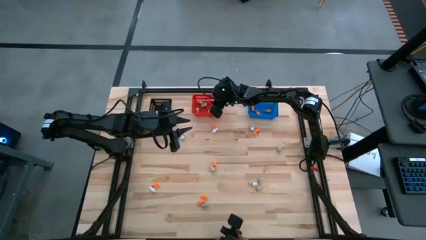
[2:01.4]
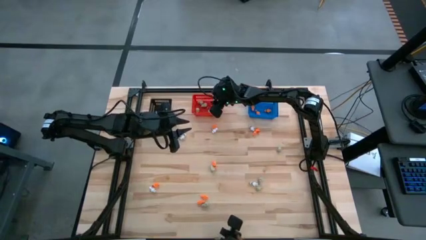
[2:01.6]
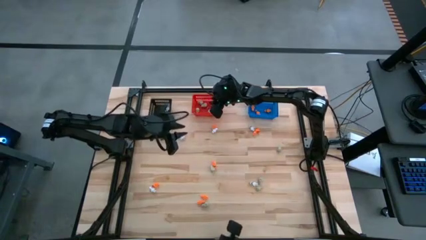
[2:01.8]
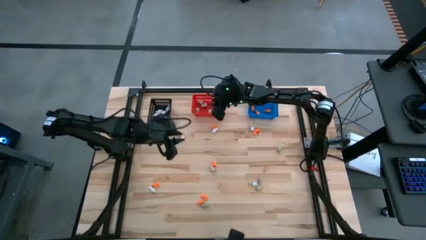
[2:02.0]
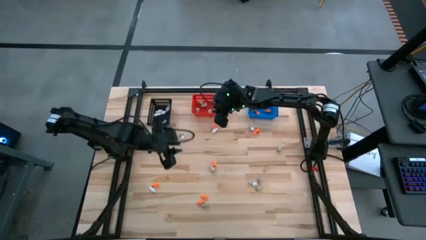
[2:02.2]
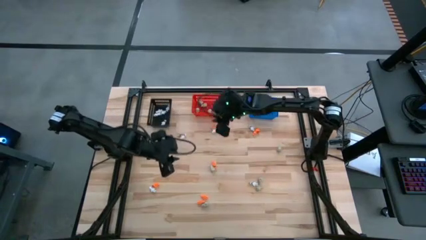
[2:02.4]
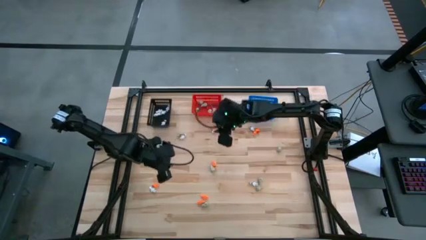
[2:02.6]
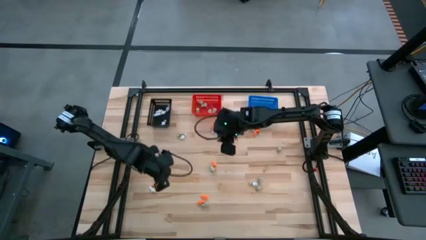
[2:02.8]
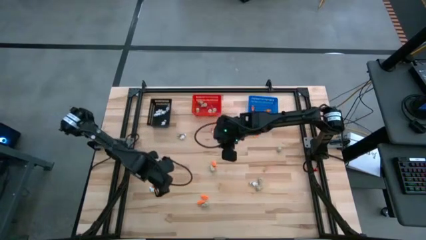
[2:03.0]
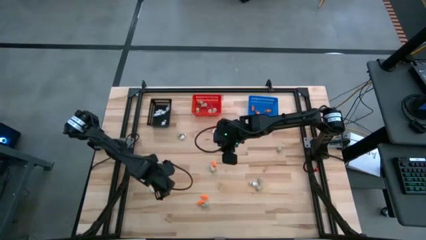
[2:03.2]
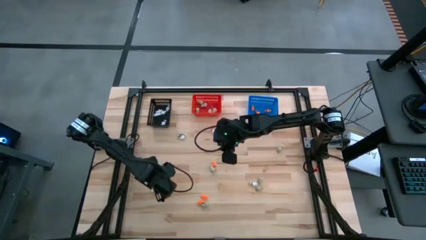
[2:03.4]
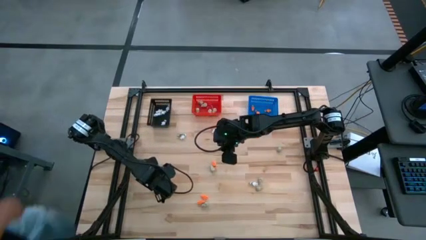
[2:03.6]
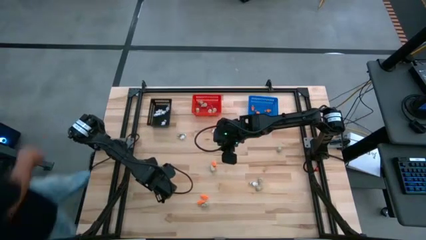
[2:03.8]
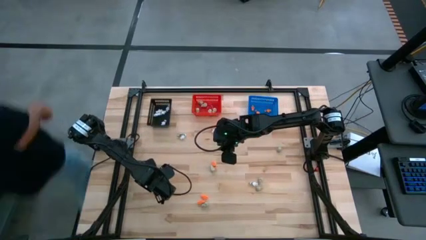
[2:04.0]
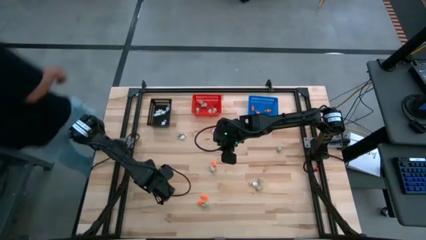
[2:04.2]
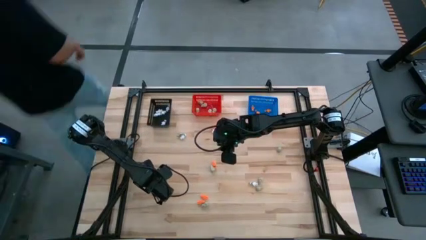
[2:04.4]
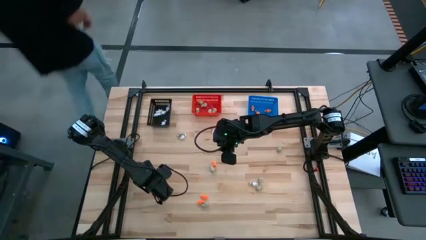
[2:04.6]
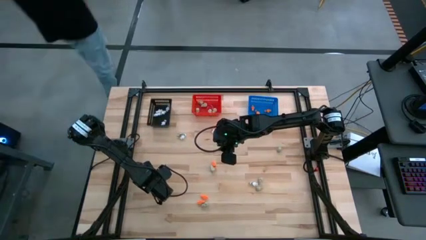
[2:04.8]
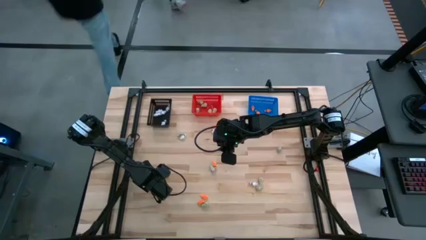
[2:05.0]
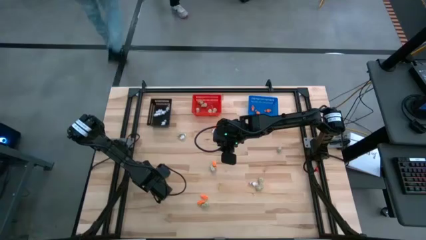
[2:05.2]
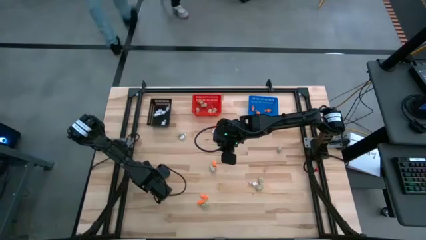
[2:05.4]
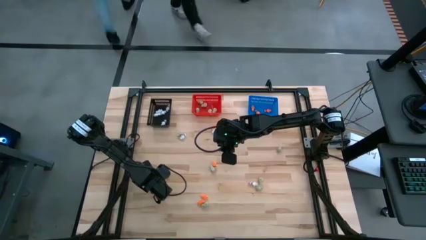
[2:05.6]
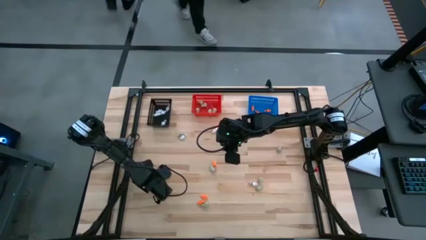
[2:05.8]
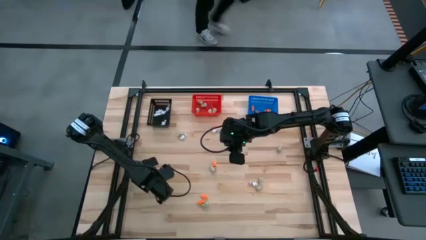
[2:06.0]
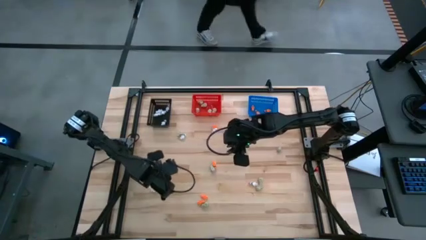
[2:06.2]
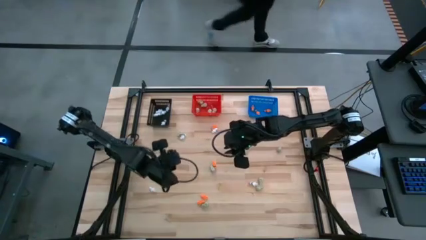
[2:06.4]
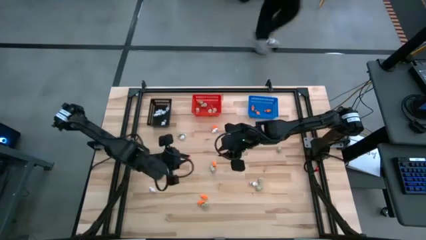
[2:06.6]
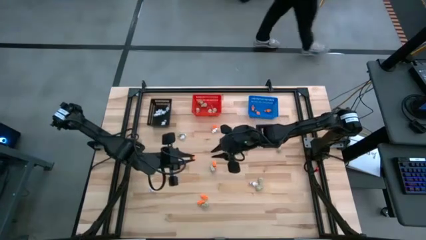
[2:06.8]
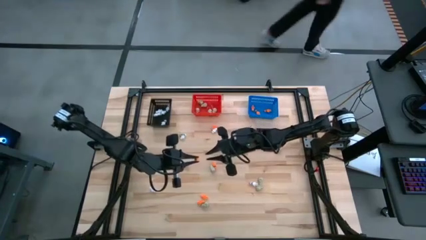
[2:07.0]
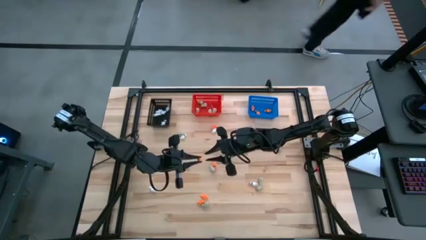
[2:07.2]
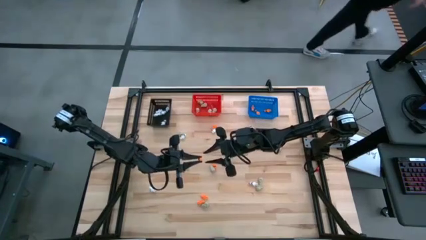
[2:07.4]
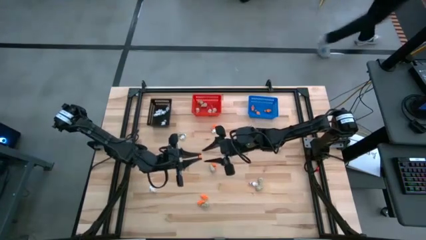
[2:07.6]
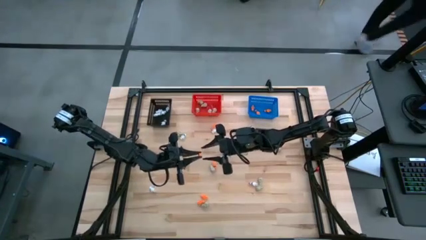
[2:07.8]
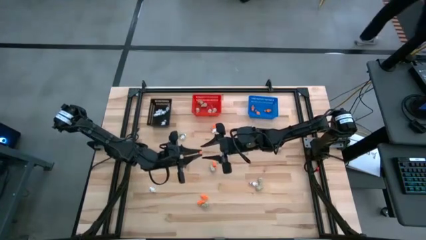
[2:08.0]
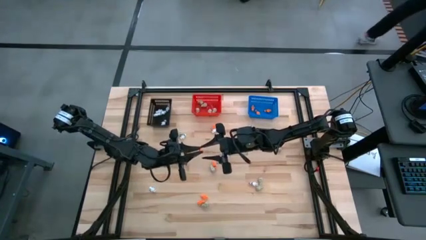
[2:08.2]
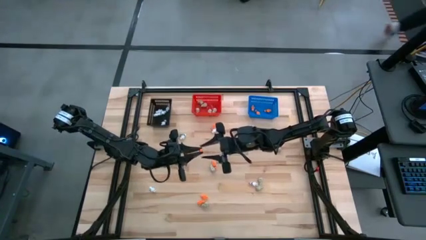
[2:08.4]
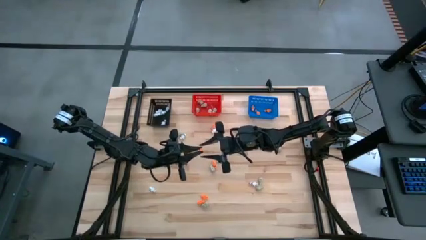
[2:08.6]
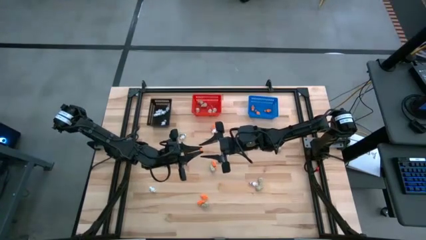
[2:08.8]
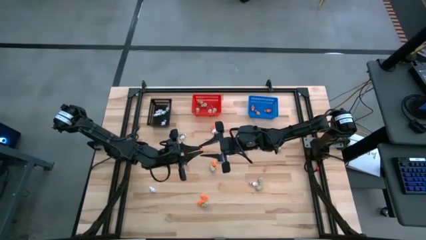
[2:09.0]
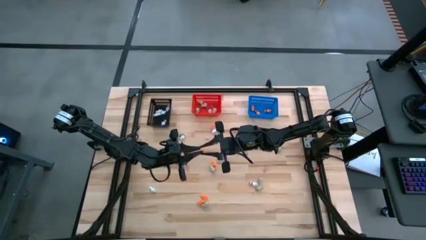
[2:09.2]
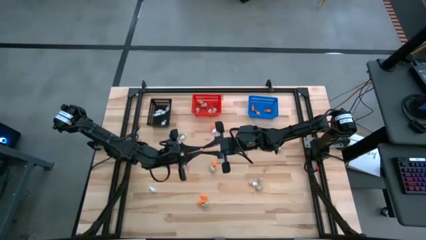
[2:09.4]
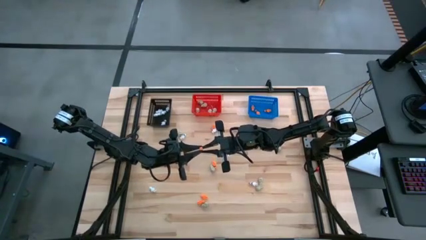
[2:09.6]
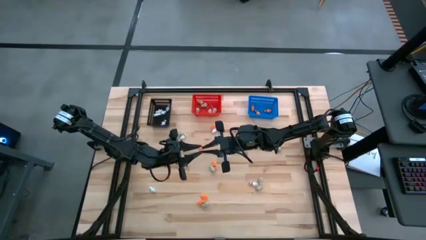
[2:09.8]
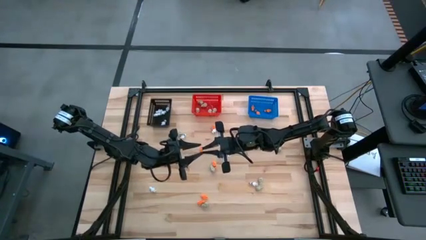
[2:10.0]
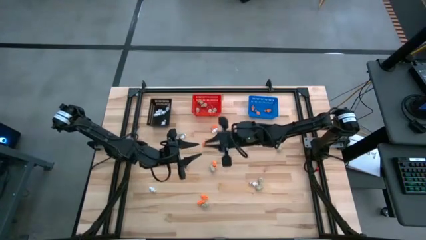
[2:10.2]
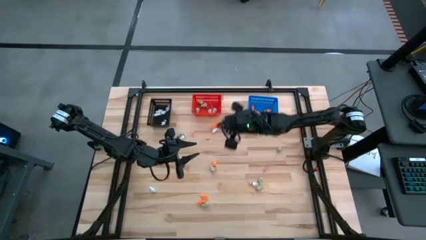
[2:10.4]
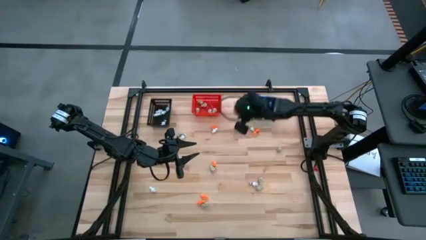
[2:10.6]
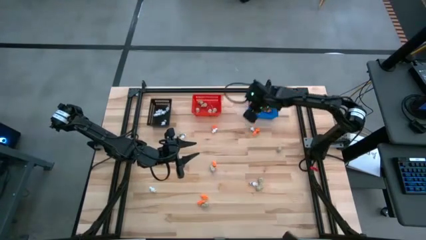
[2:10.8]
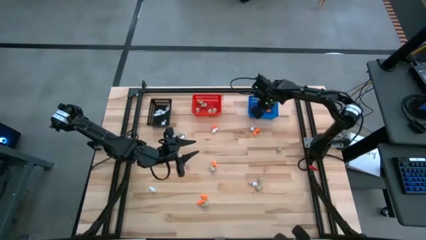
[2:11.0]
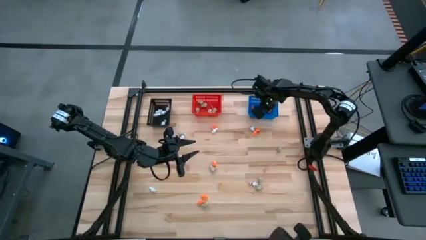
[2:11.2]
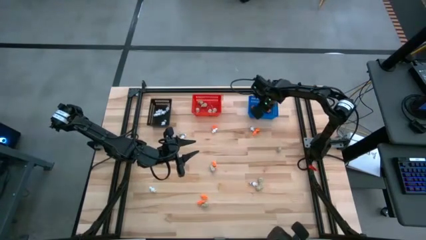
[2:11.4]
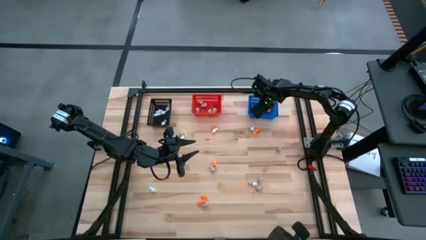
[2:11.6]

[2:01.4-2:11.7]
Task: Sort Halloween decoration
Put the orange skeleton toy into the blue bin

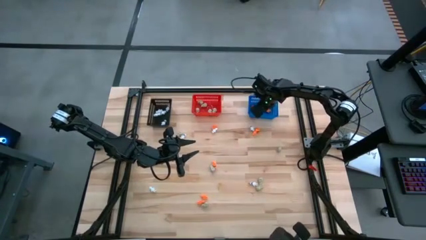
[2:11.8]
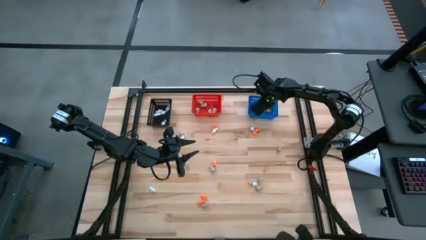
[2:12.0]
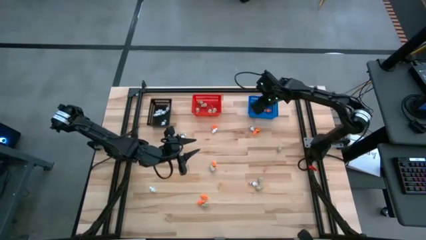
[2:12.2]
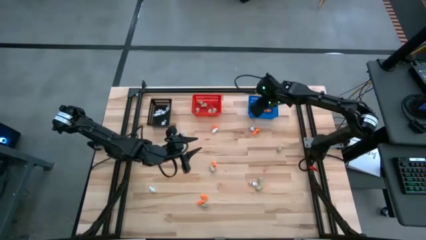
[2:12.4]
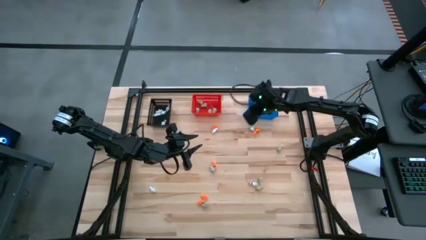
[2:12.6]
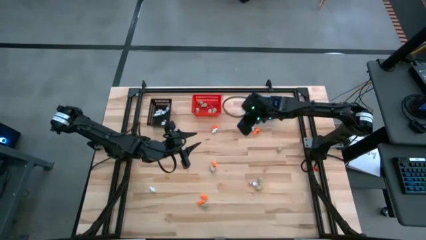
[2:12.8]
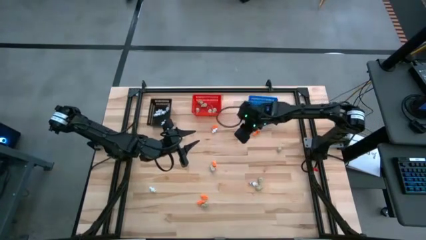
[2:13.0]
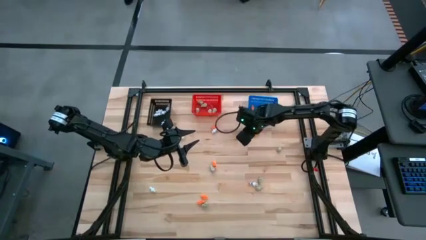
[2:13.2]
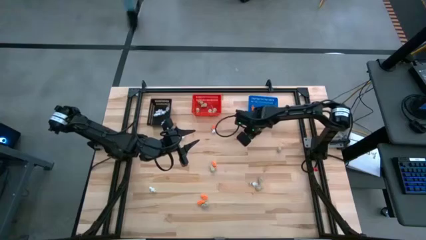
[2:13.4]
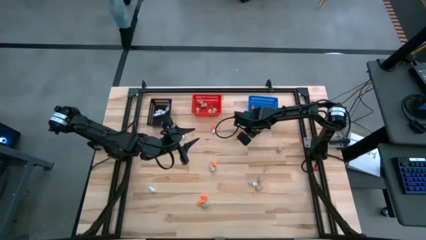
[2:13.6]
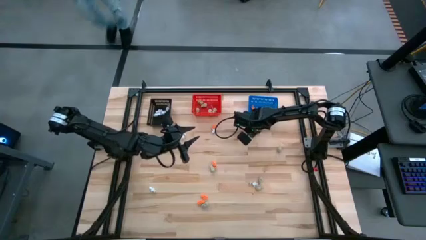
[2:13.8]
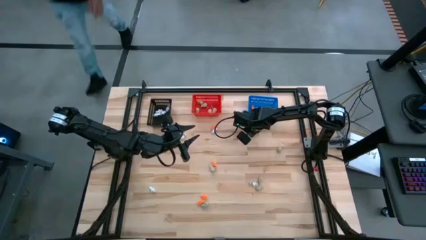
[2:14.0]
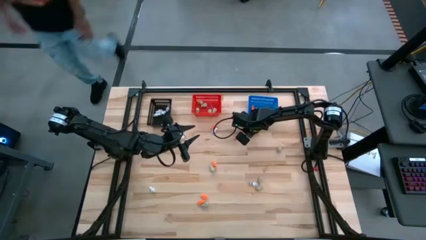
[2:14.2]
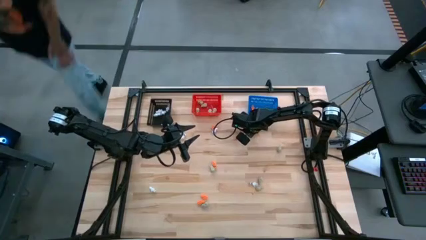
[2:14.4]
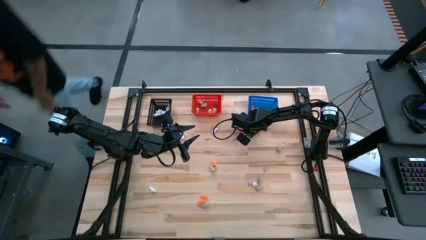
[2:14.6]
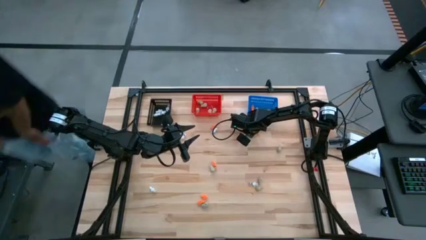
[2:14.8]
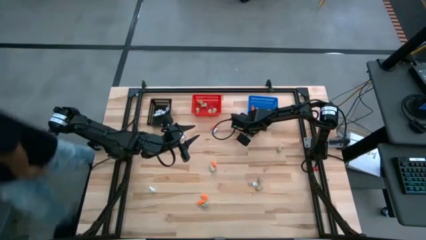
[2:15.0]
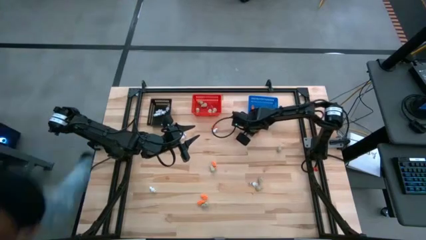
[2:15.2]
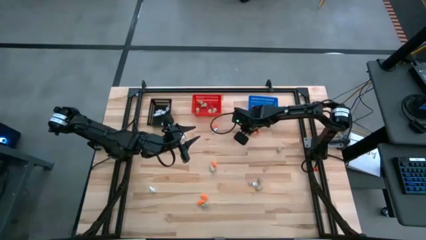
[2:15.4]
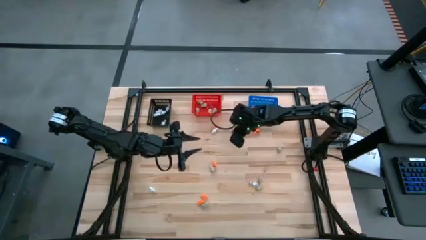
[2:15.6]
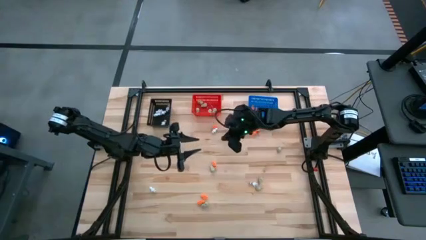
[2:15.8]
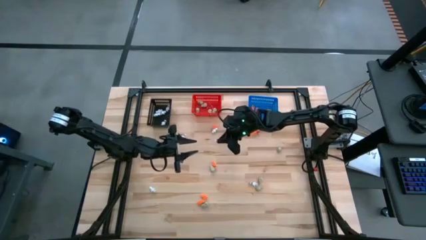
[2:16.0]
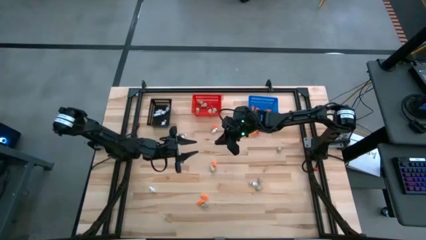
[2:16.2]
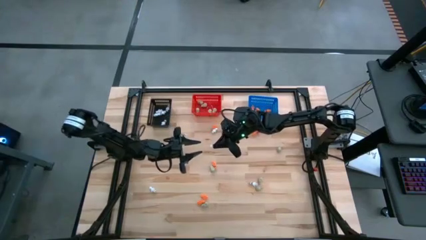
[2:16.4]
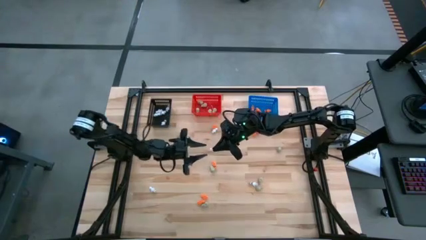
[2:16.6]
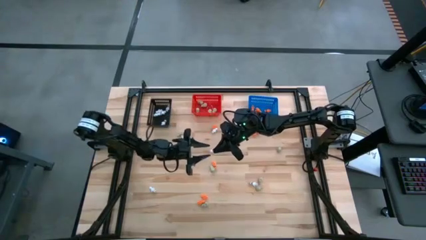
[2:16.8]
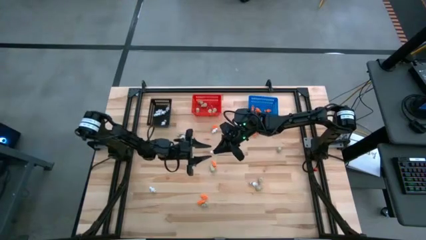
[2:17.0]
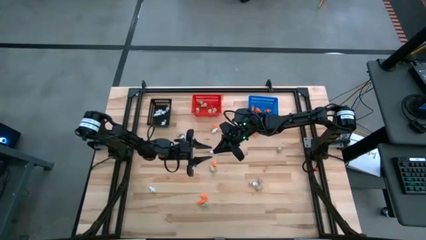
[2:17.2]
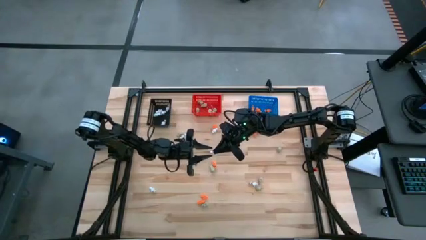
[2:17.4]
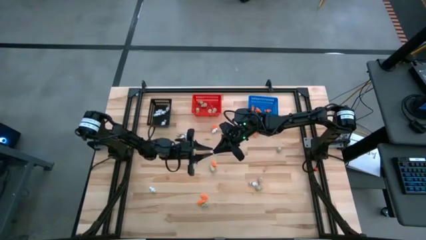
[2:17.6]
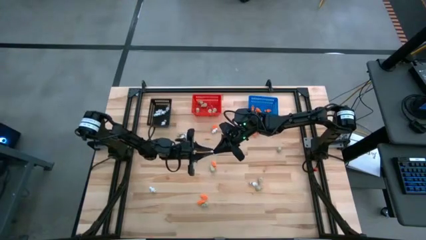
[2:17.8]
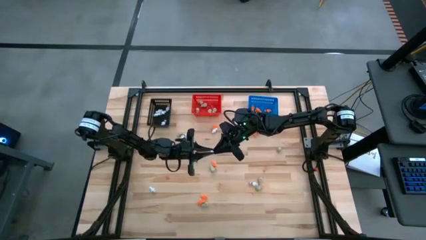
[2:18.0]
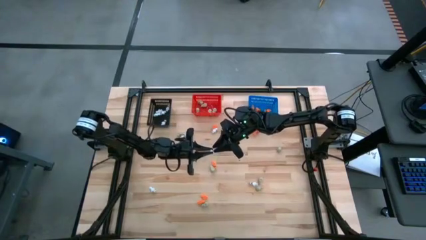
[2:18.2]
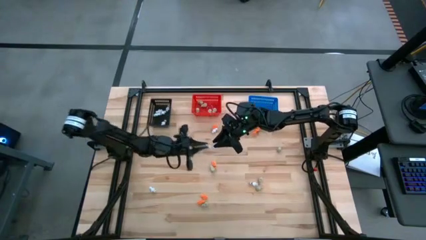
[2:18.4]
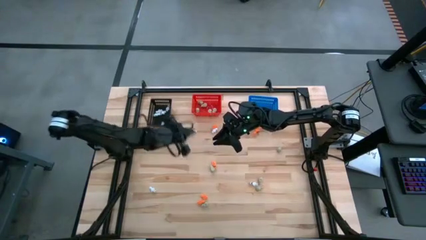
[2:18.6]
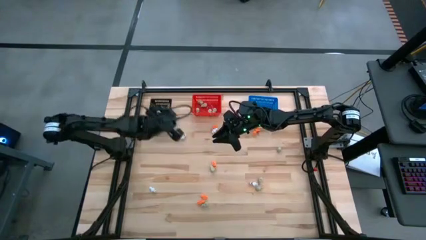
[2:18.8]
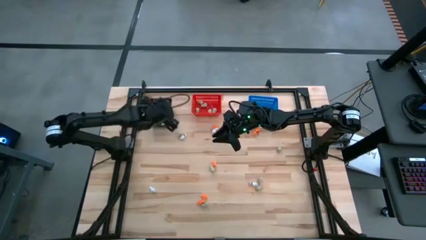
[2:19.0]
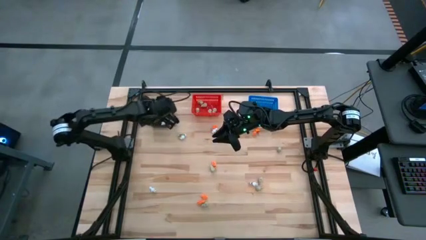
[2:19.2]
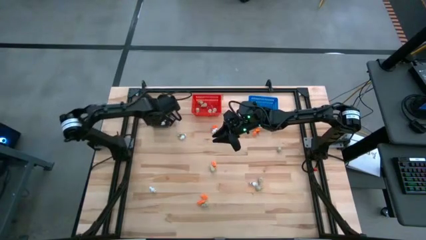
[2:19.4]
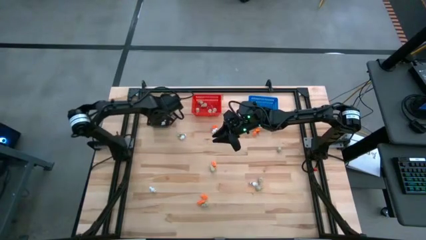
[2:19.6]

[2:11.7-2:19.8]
Put the white skeleton toy into the black bin
